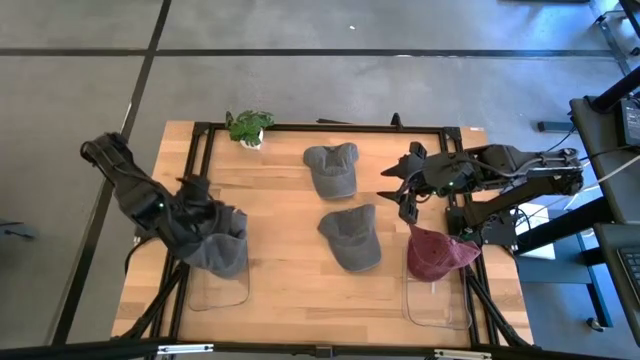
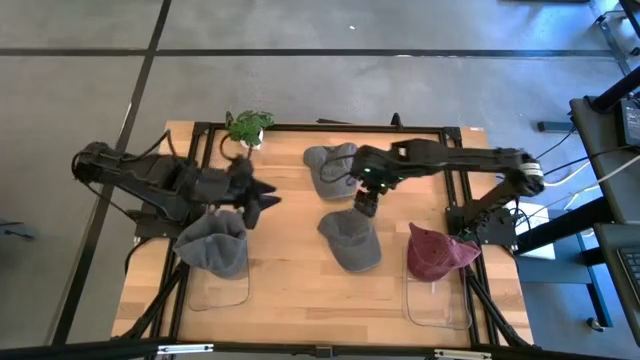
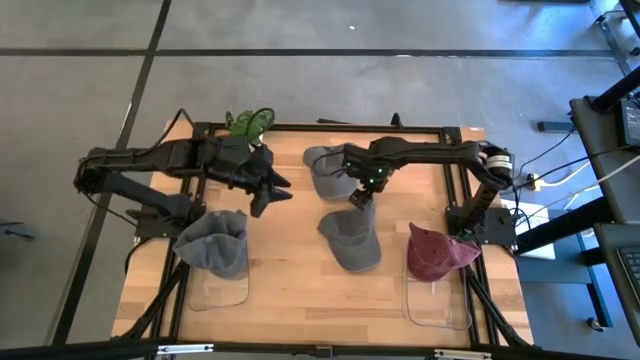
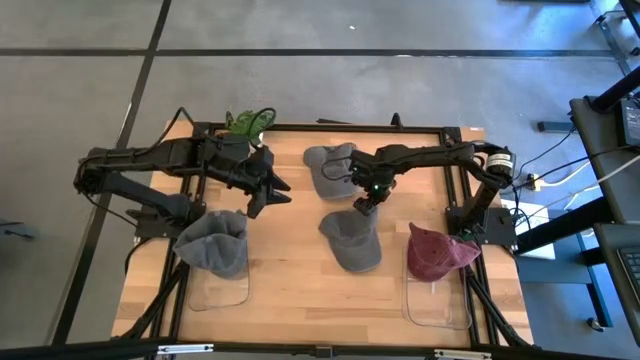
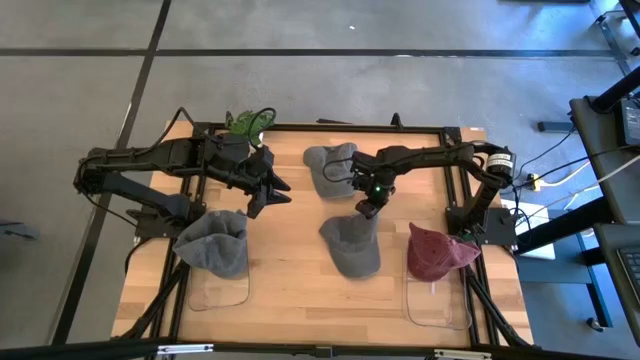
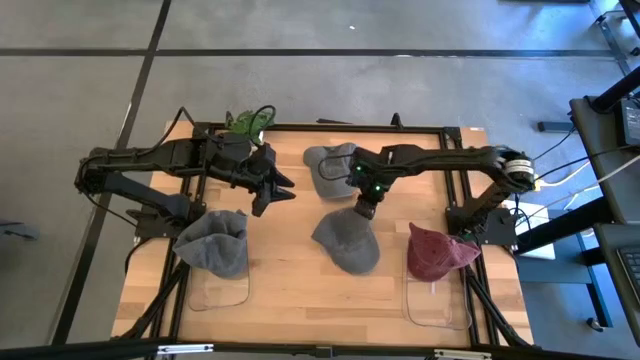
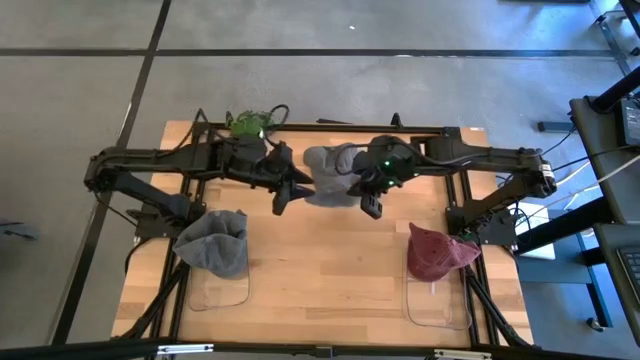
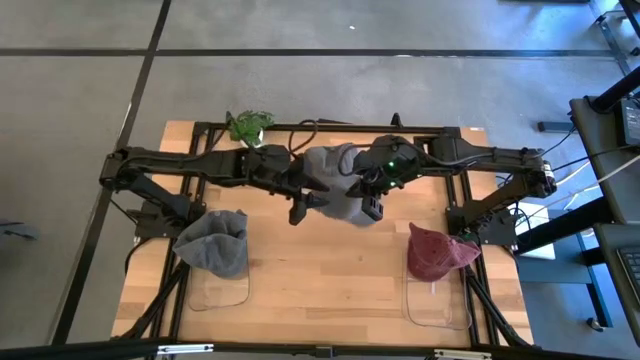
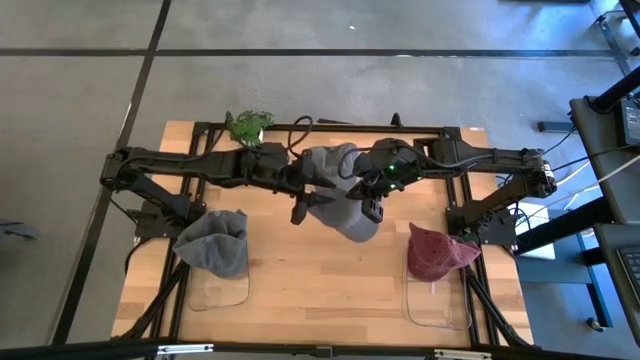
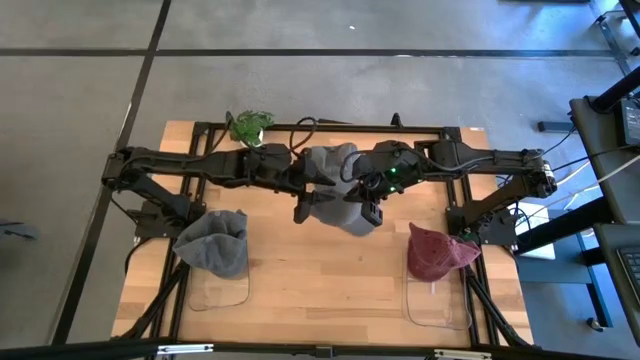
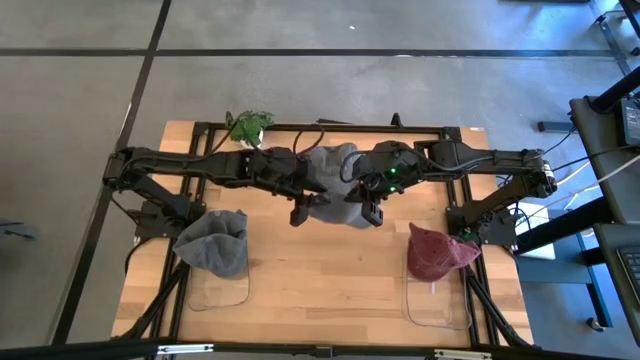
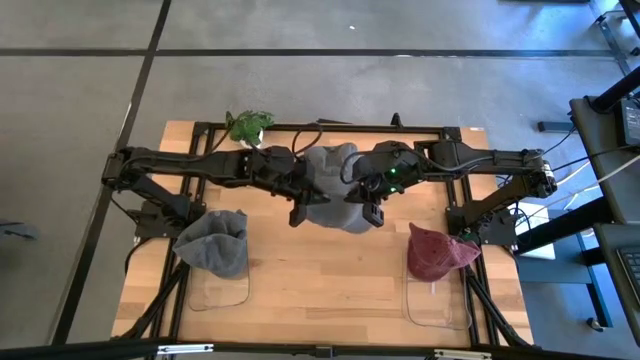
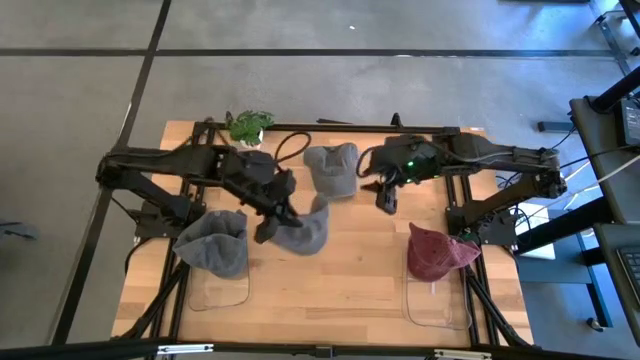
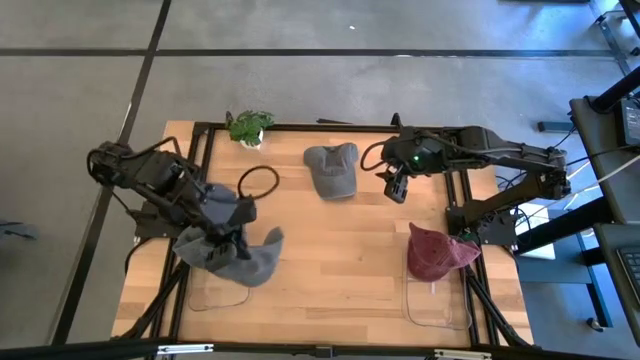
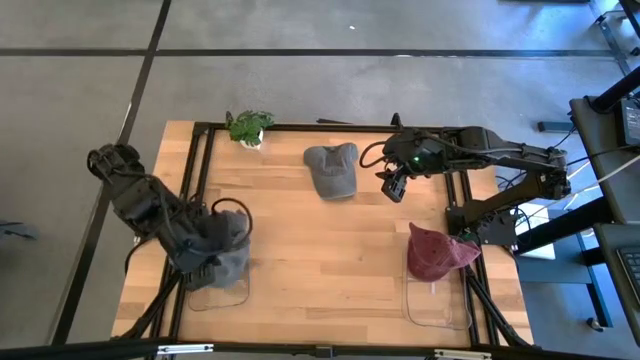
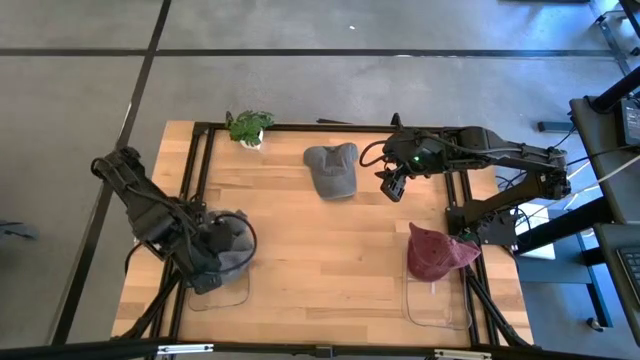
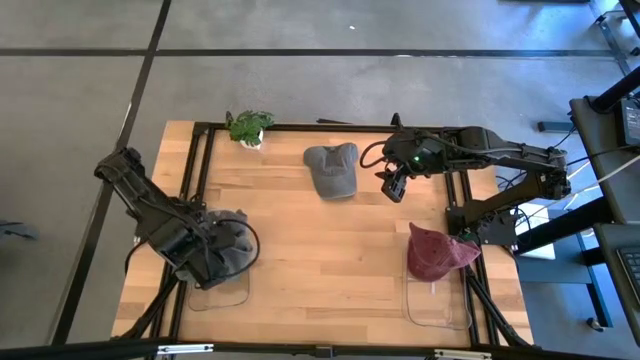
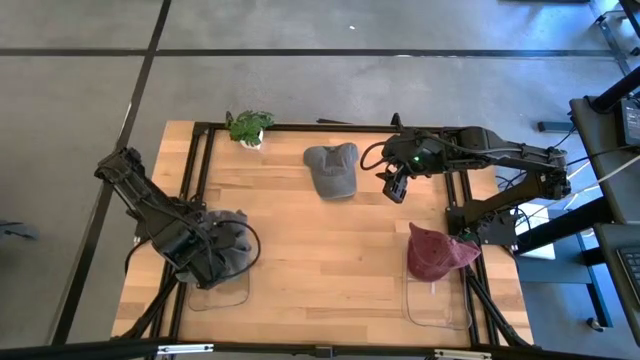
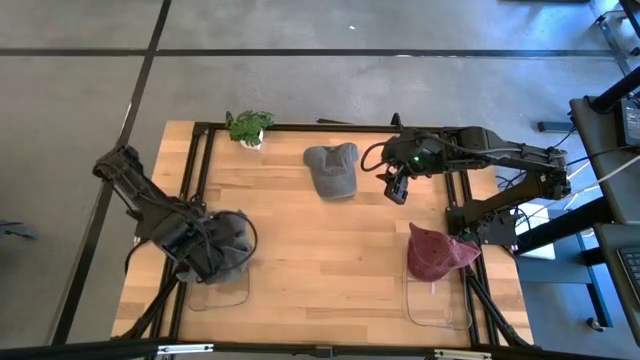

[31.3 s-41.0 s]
Task: Pick & Place hat
Put the blue cap into the left transparent bin

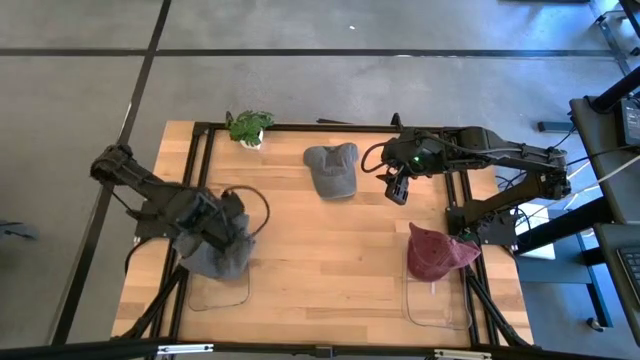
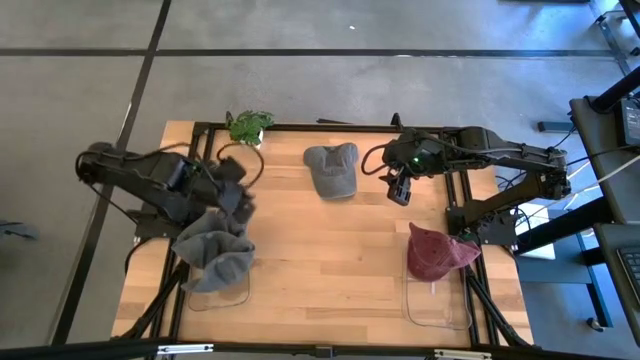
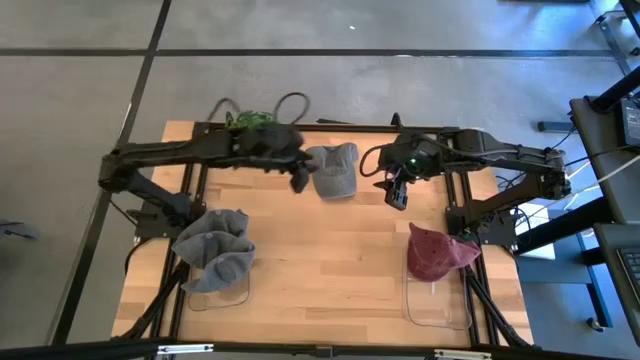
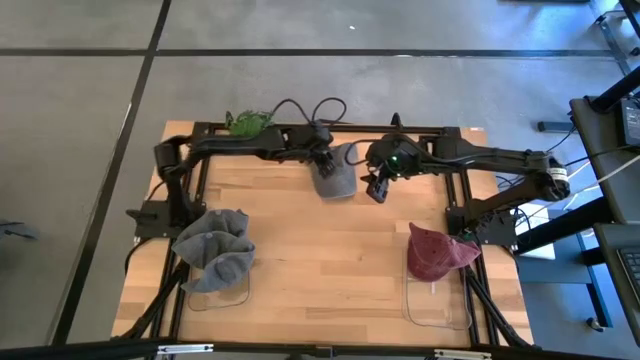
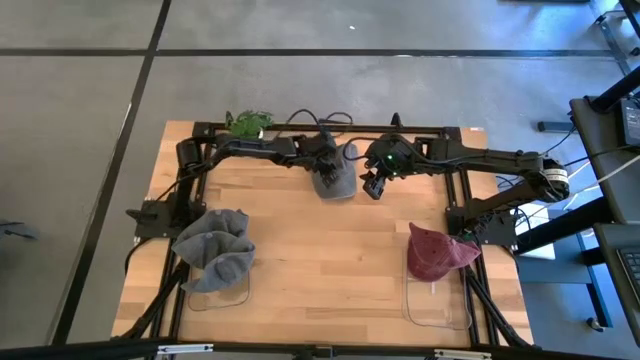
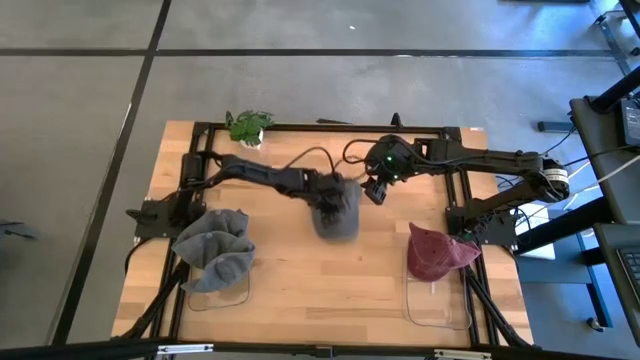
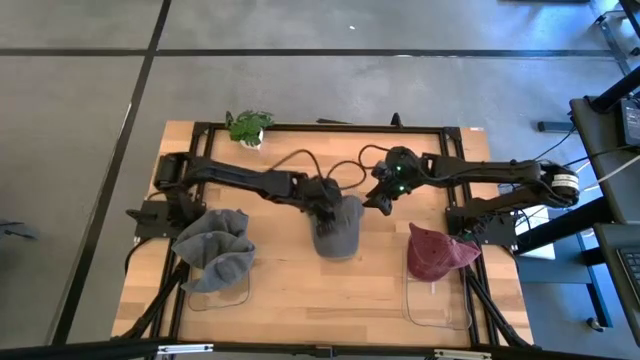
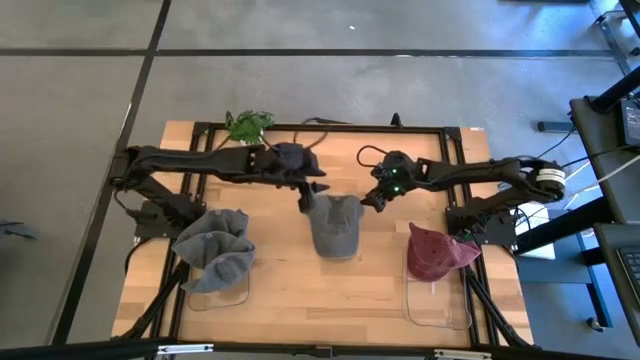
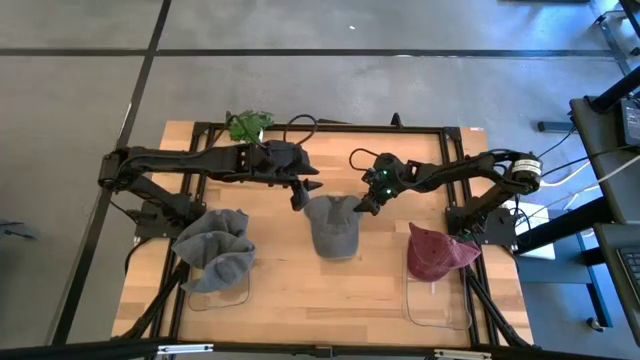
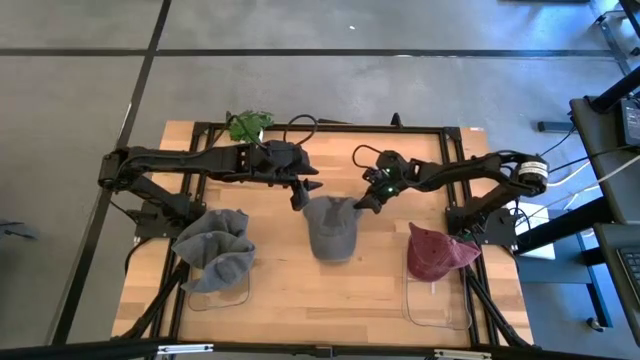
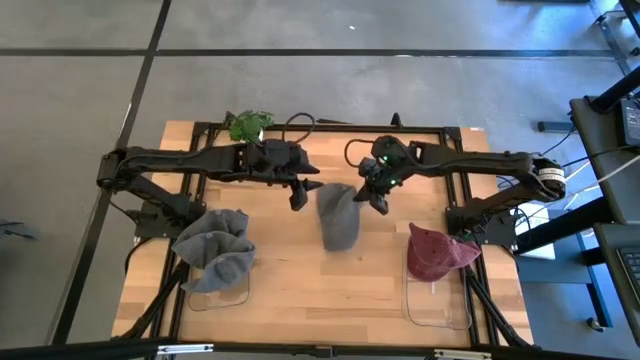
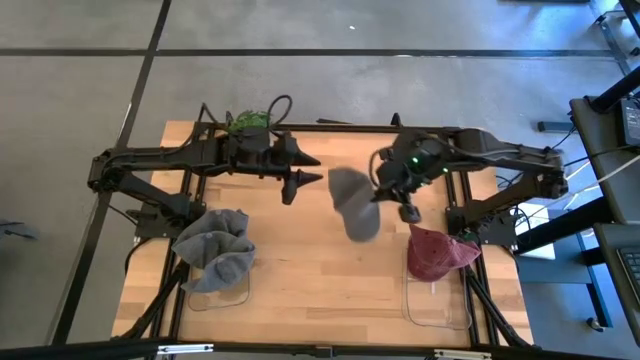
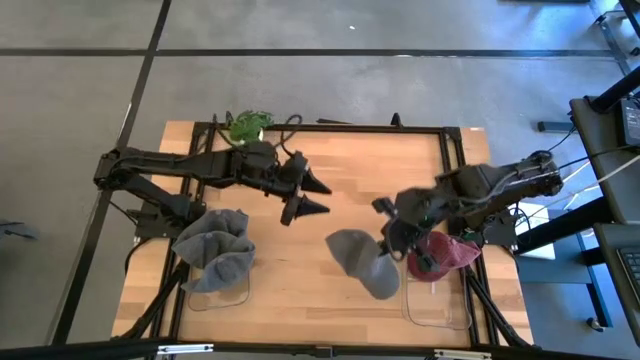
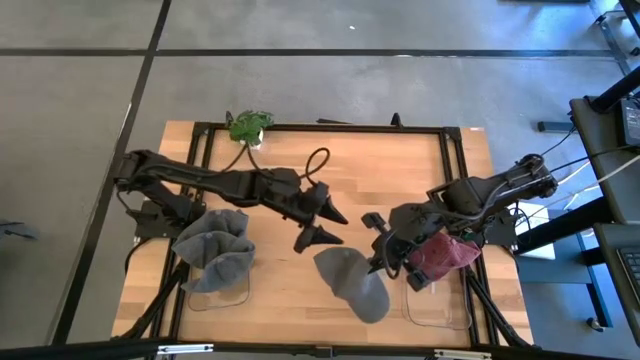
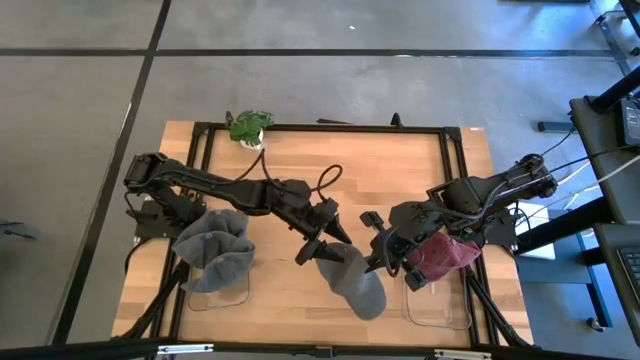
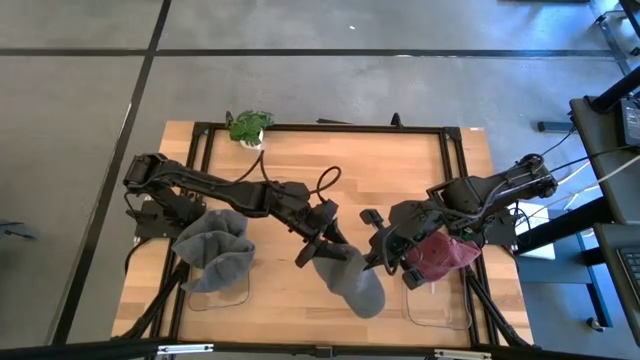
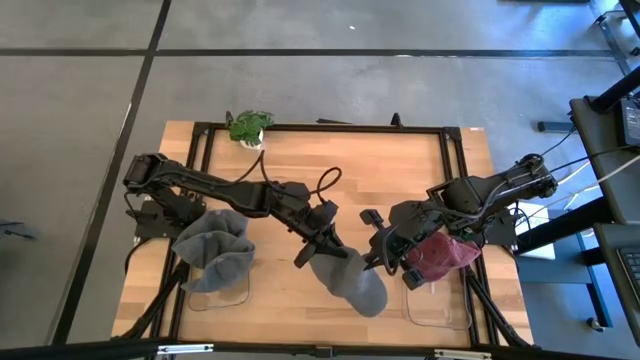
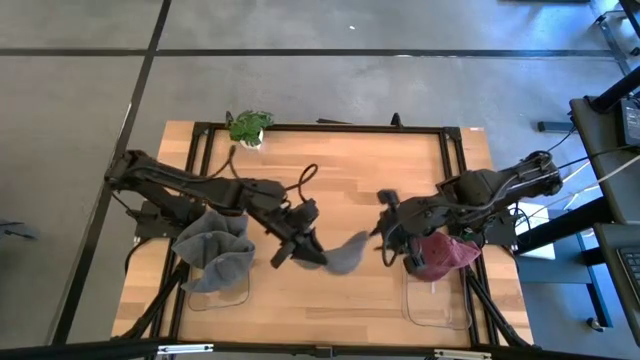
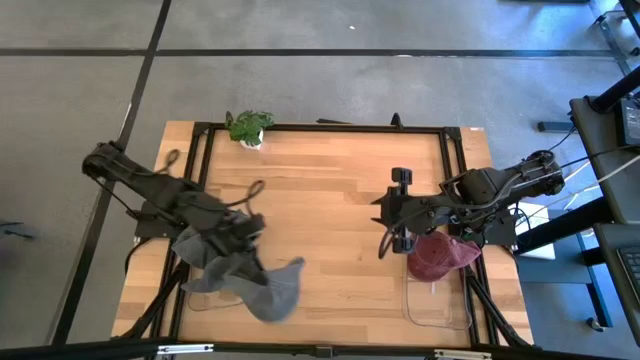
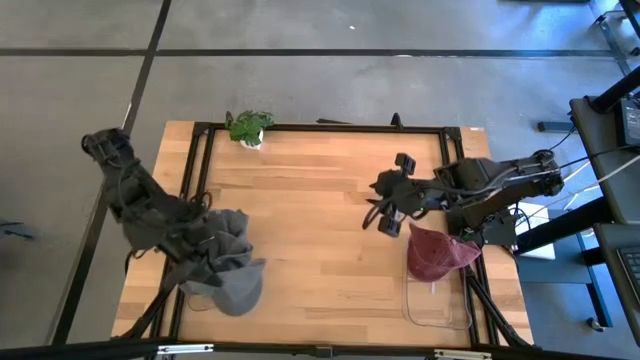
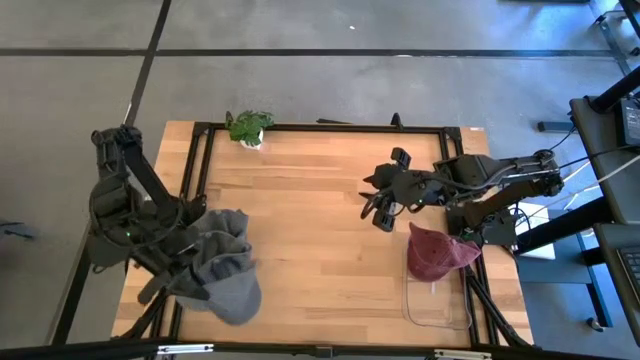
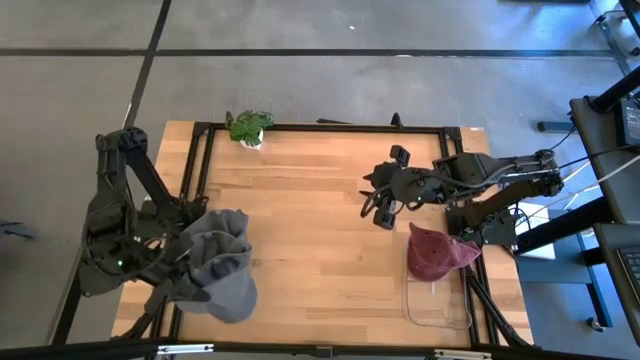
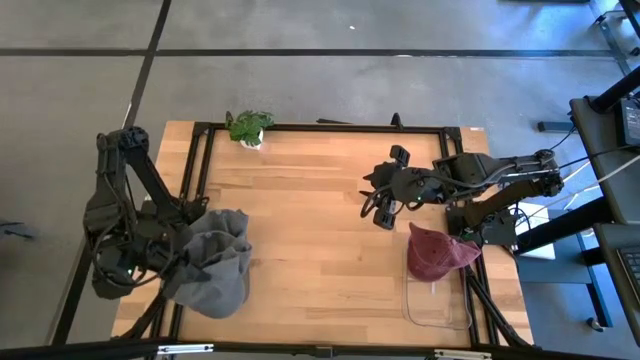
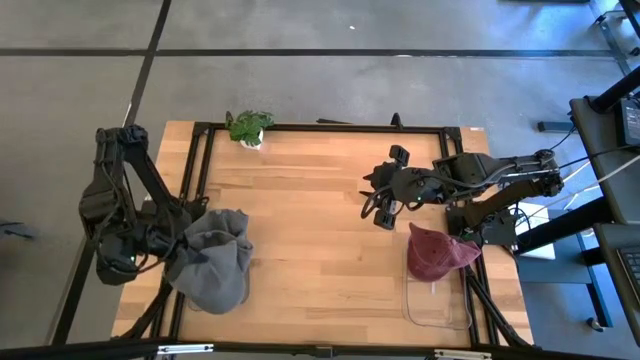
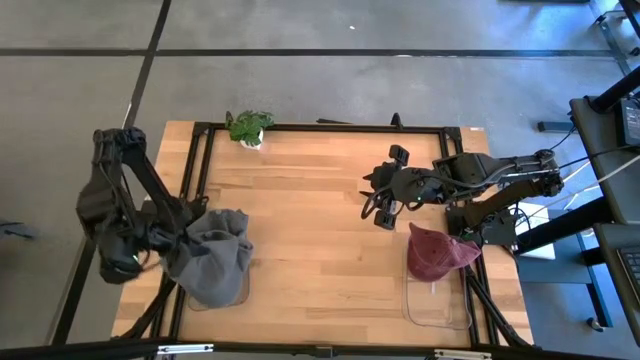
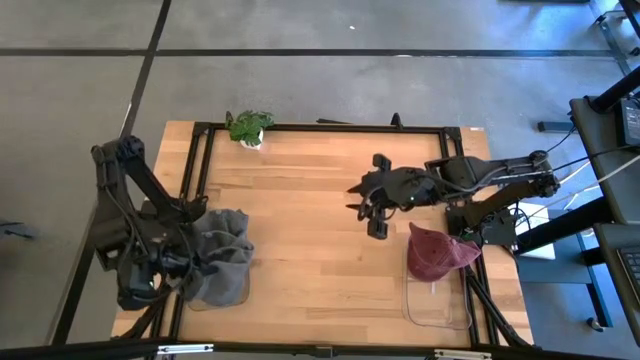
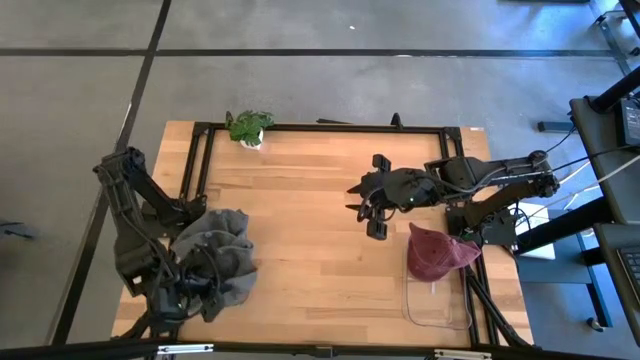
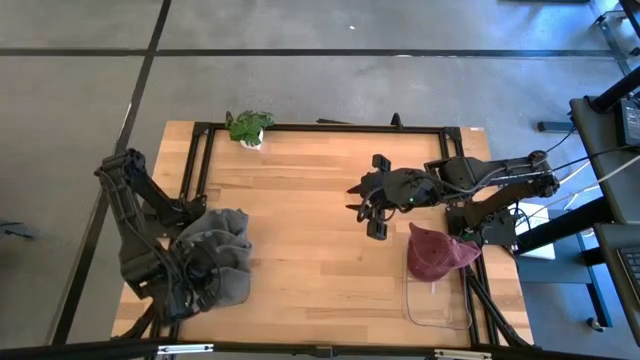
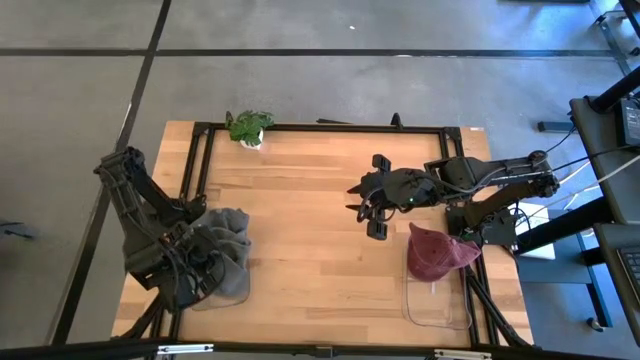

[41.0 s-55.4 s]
Put the blue cap into the left transparent bin
